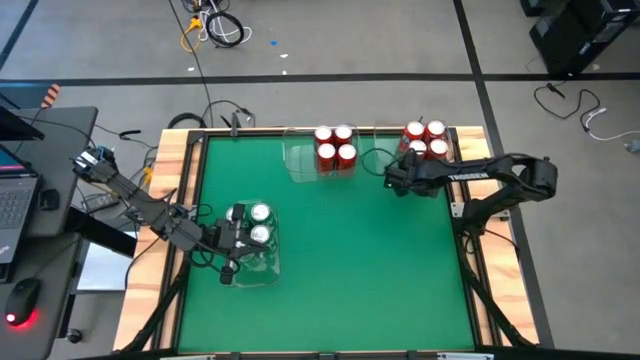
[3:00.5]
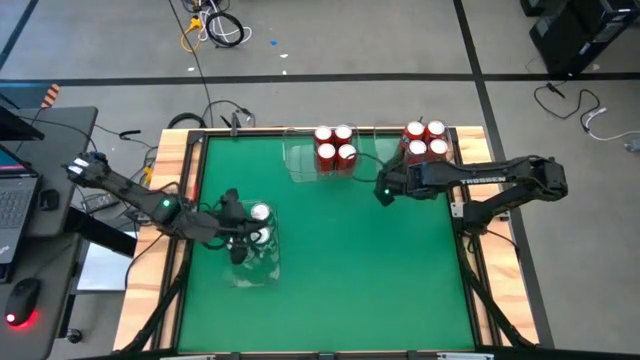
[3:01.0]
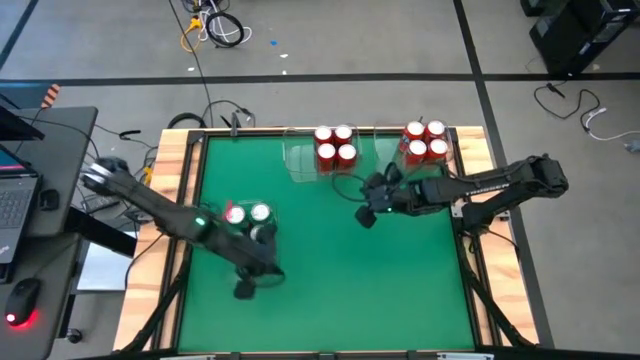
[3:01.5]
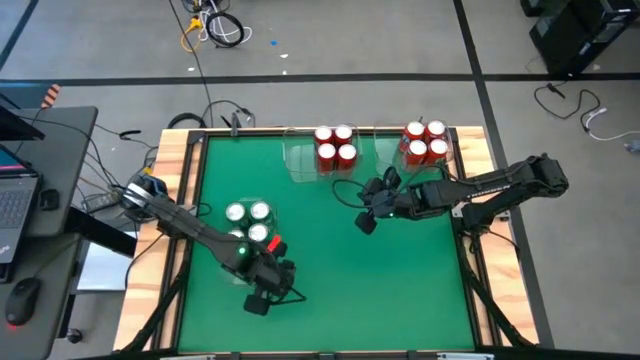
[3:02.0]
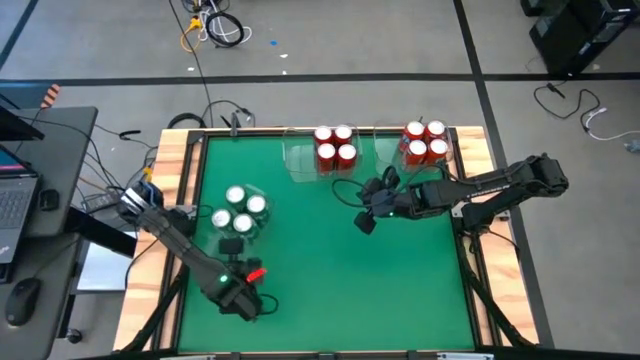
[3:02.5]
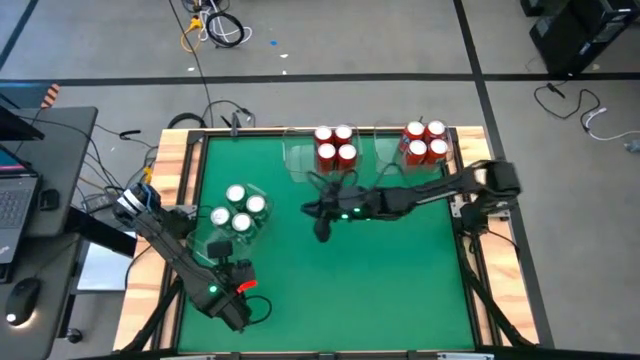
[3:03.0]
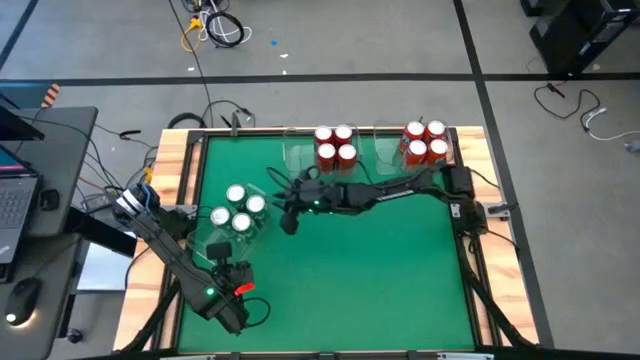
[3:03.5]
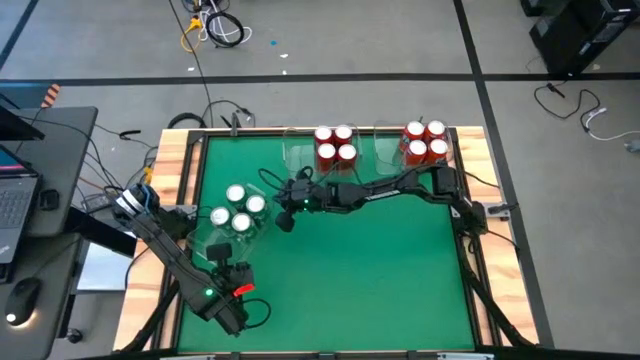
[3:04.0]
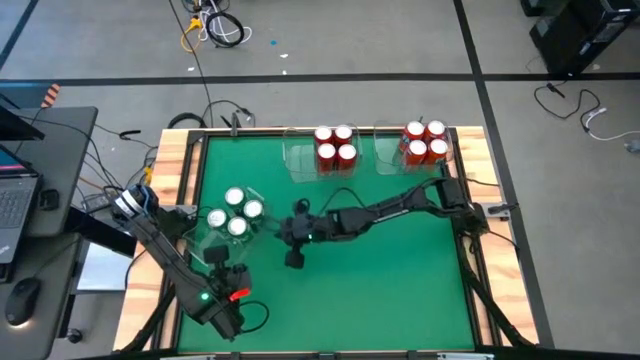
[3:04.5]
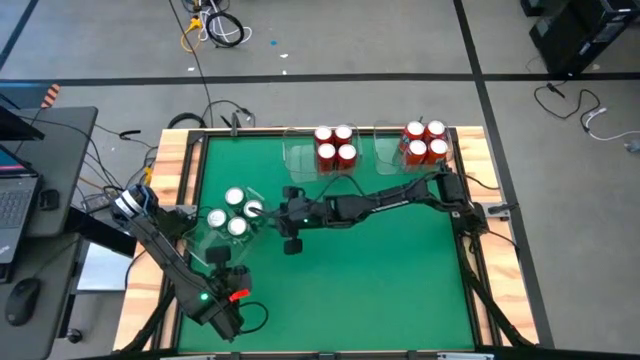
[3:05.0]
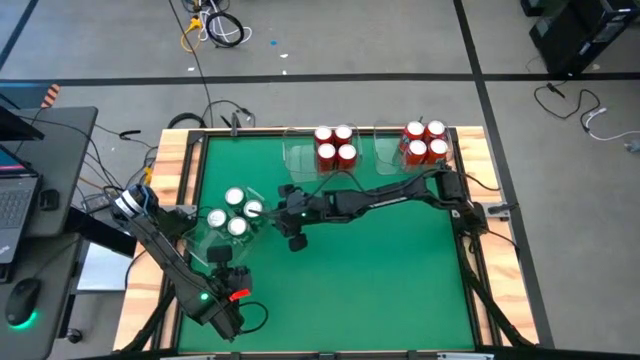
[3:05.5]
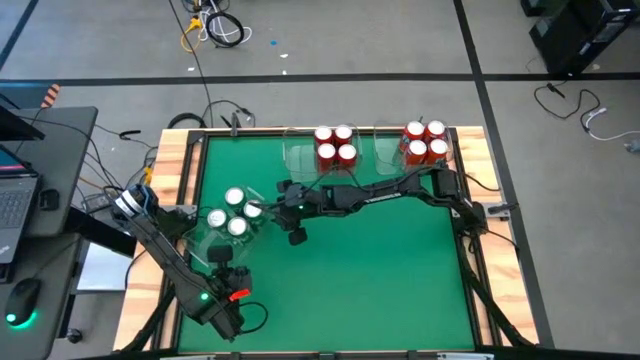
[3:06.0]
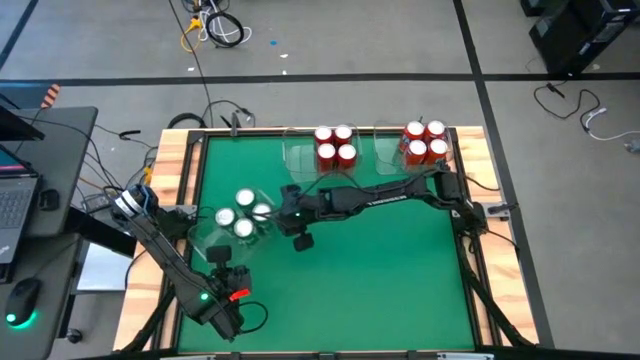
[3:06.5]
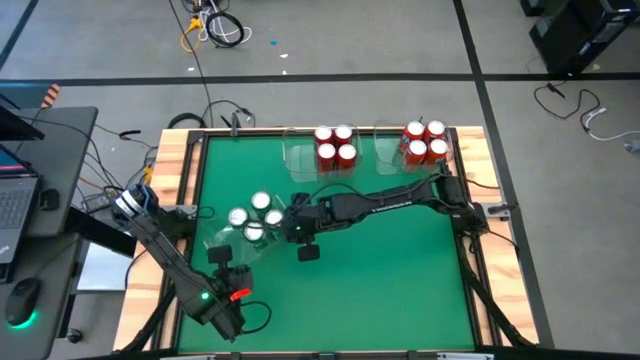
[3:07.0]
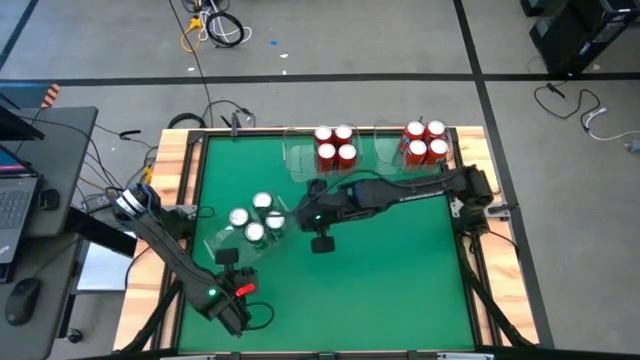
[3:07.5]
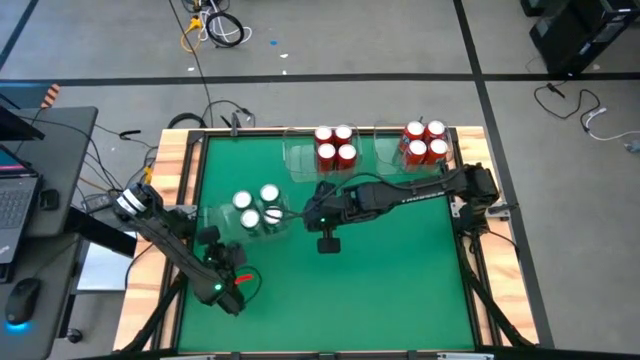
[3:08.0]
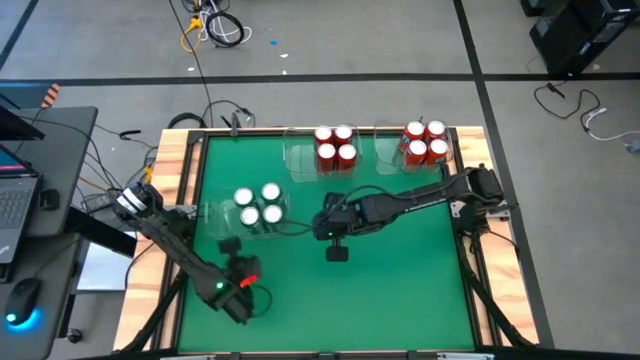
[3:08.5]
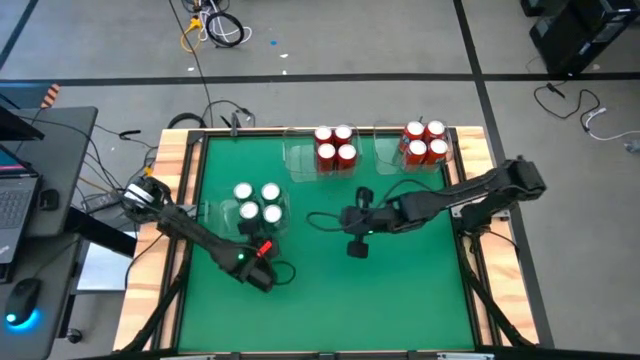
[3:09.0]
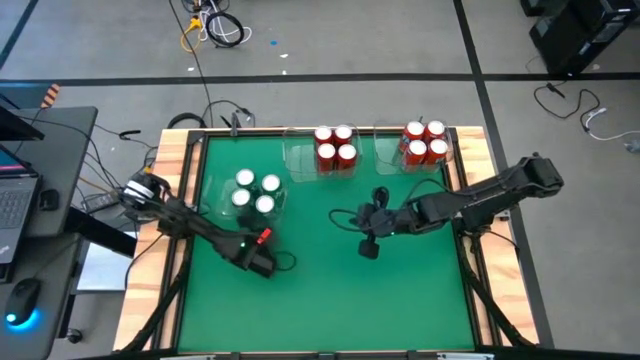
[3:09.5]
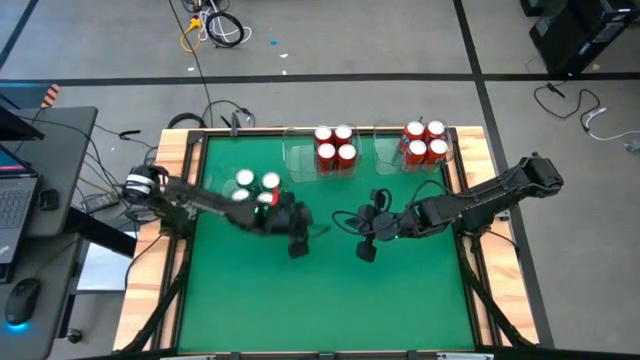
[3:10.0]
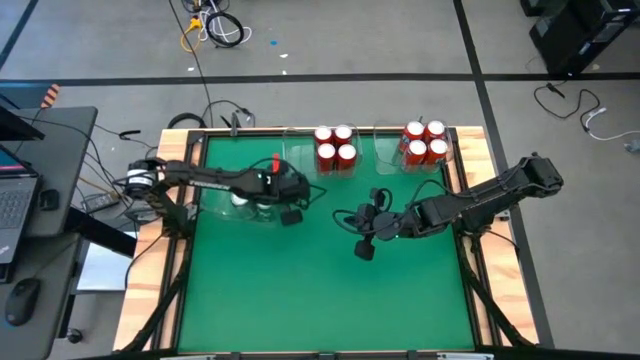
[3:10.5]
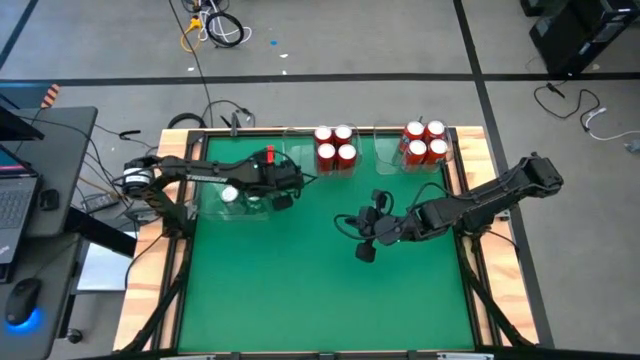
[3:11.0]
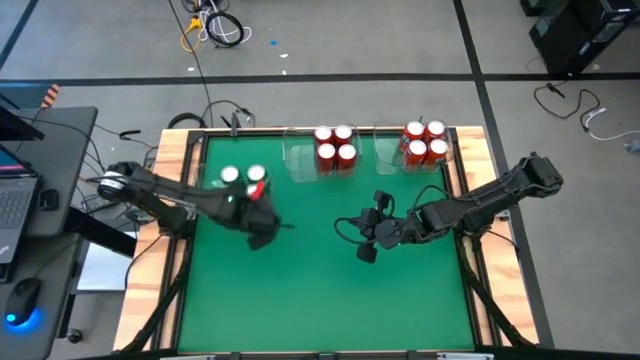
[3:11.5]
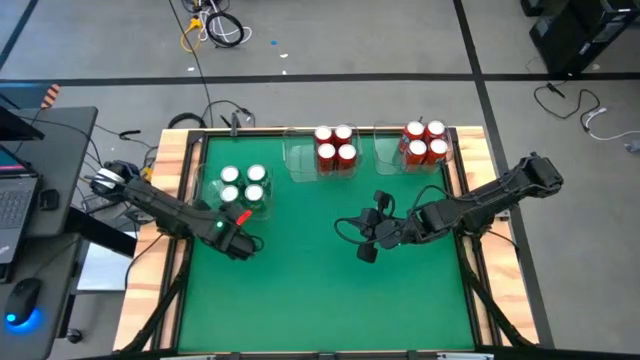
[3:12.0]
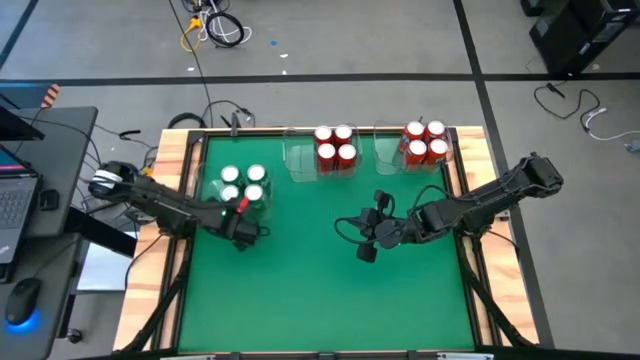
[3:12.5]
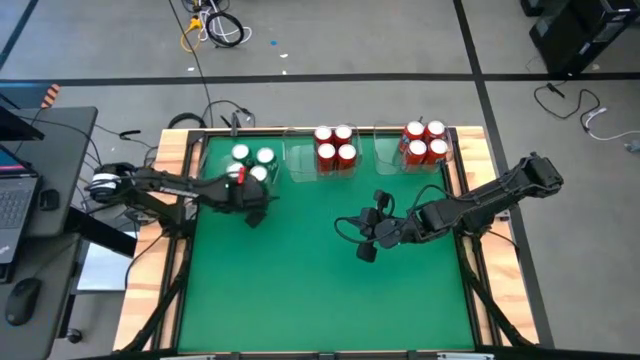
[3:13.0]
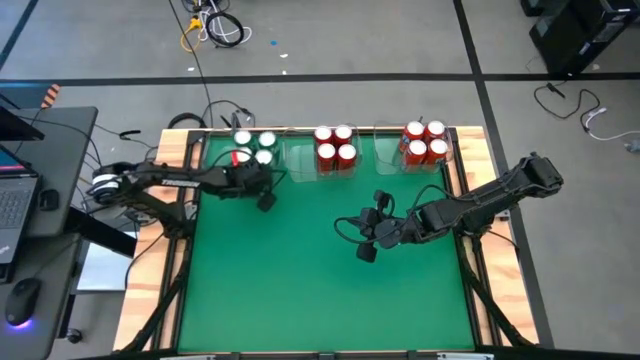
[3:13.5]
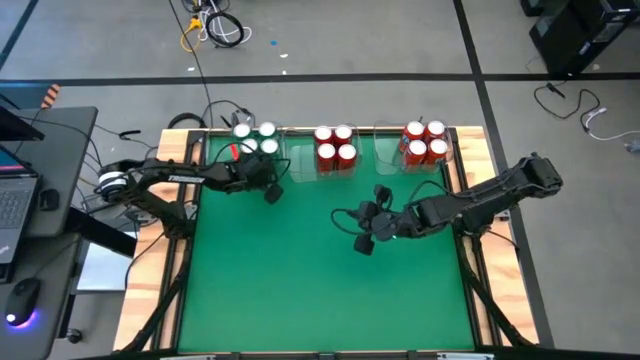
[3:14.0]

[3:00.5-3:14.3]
Task: Sort soda cans
Move the left transparent bin to the left side of the center transparent bin

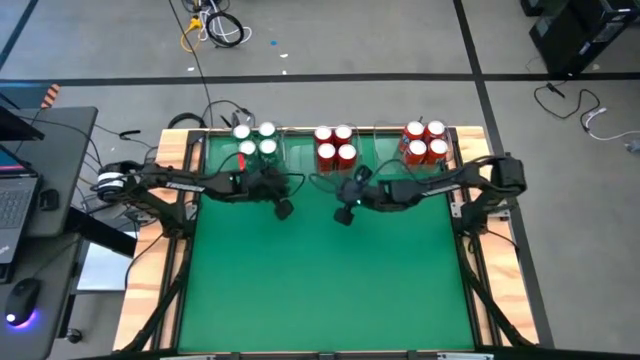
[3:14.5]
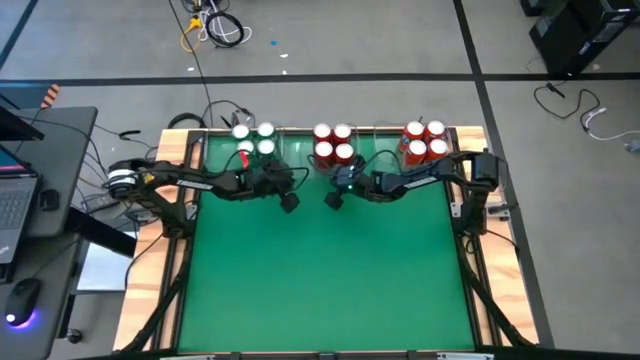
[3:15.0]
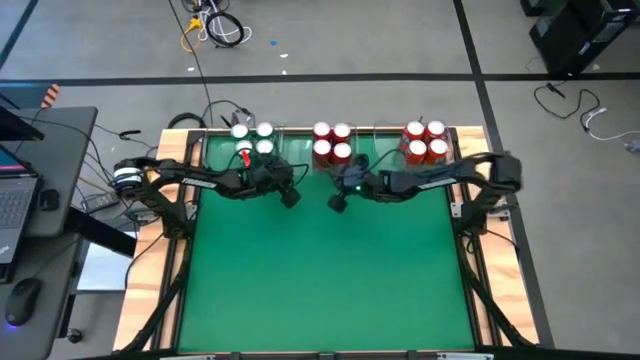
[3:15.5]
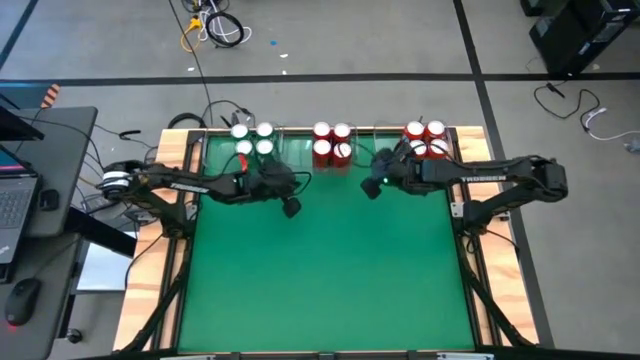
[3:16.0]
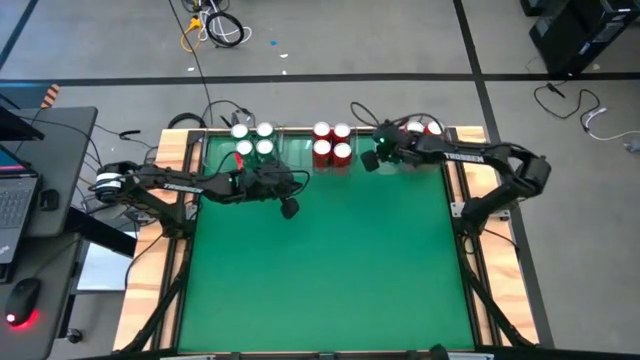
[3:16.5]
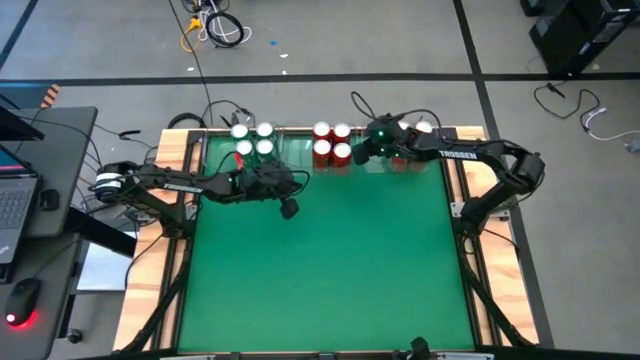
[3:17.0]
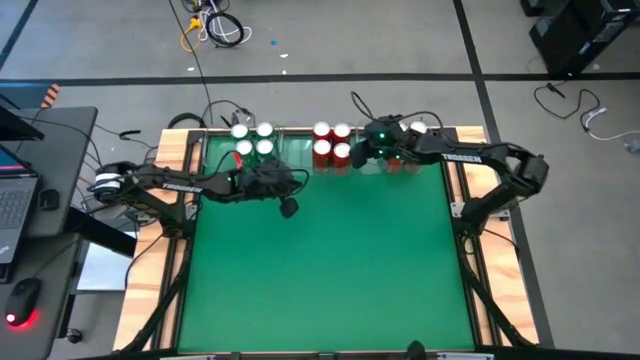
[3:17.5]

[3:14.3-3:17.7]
Adjust the transparent bins
